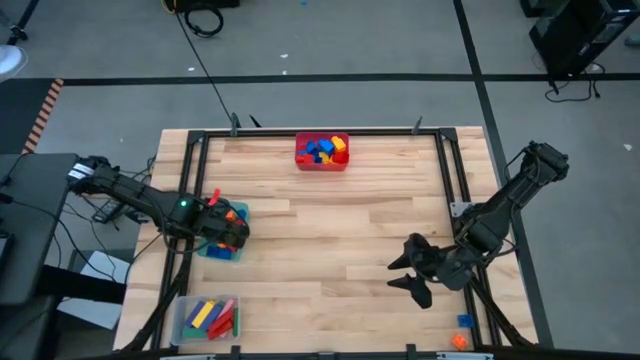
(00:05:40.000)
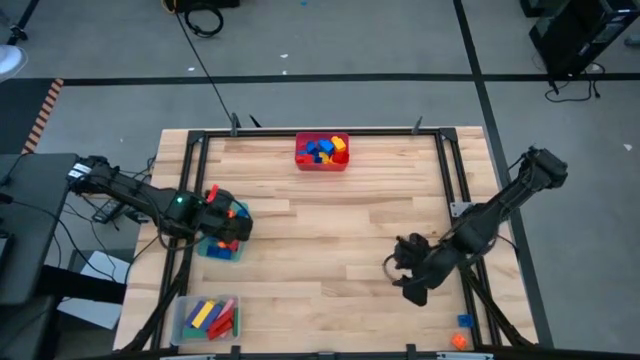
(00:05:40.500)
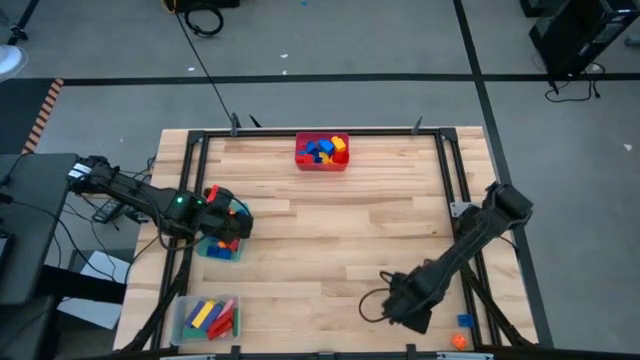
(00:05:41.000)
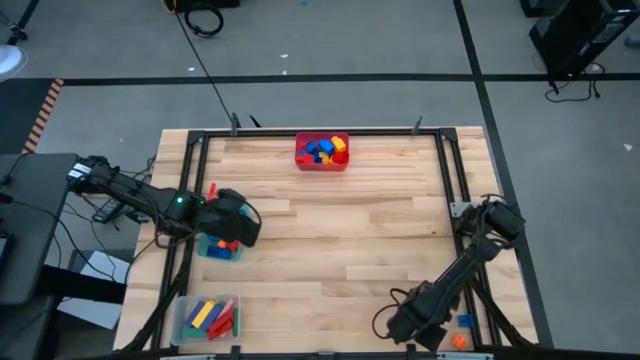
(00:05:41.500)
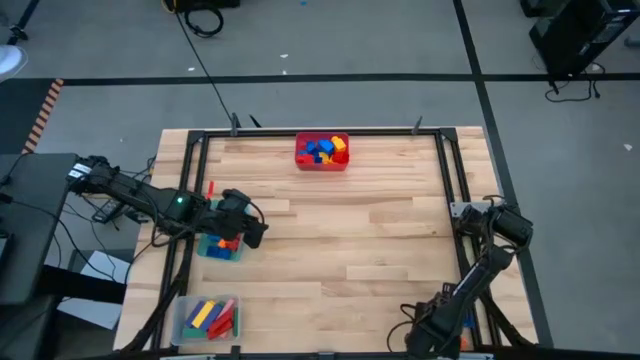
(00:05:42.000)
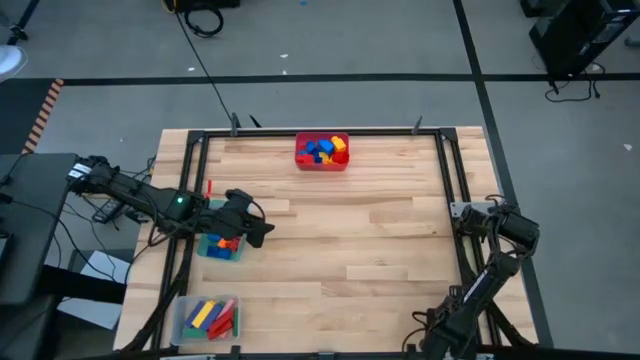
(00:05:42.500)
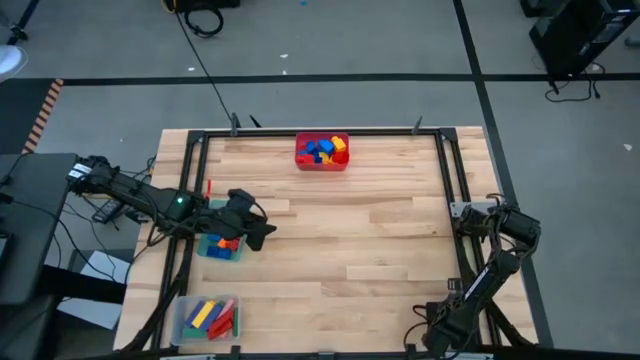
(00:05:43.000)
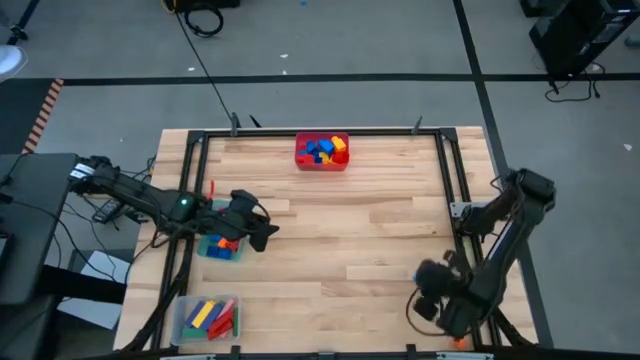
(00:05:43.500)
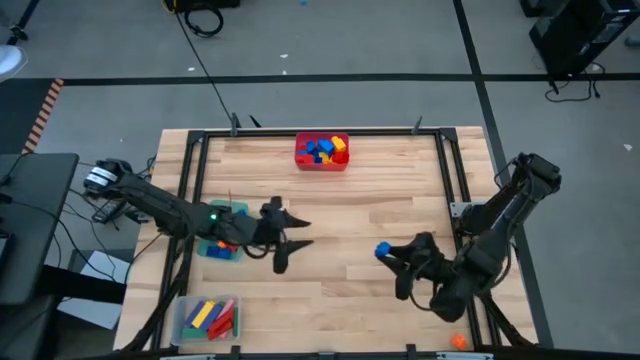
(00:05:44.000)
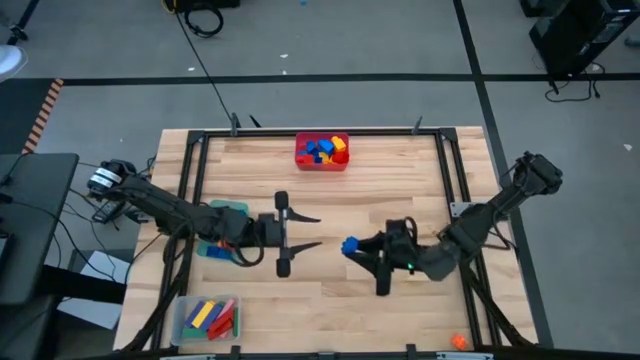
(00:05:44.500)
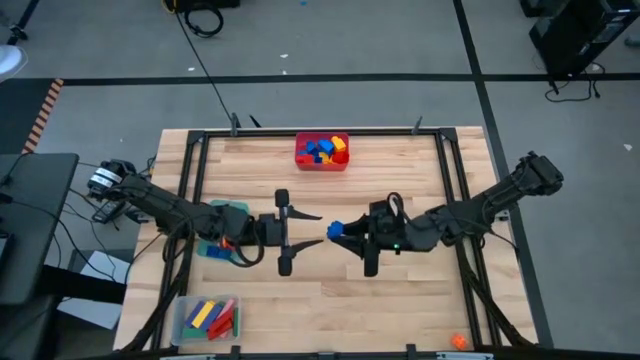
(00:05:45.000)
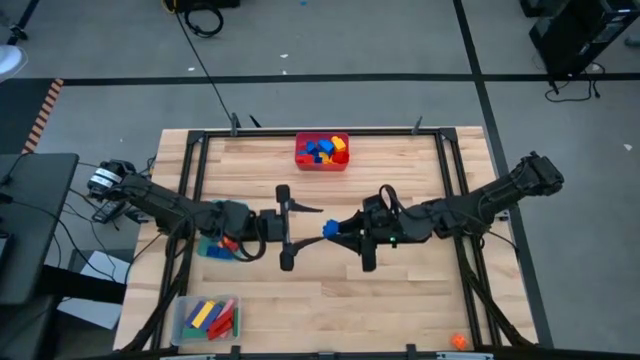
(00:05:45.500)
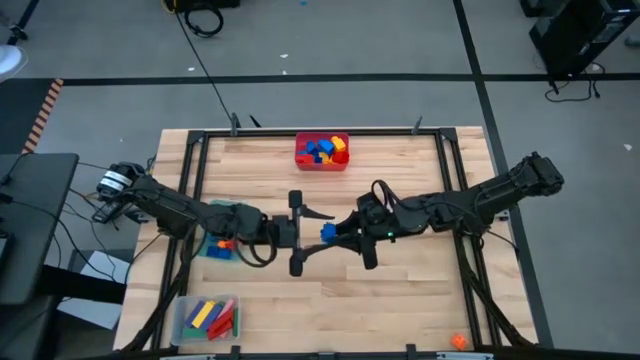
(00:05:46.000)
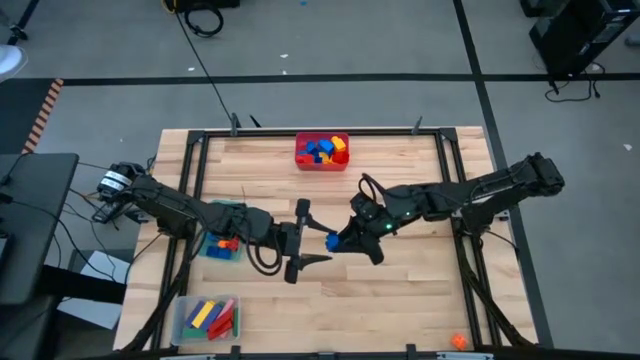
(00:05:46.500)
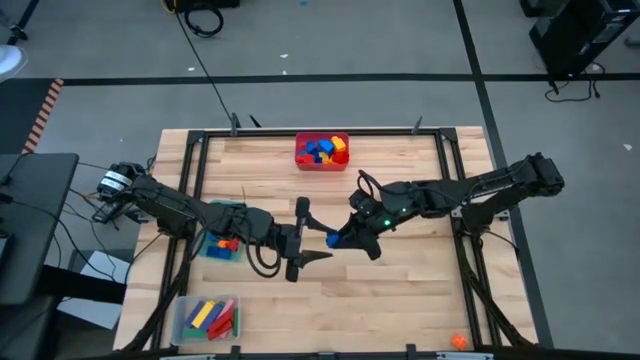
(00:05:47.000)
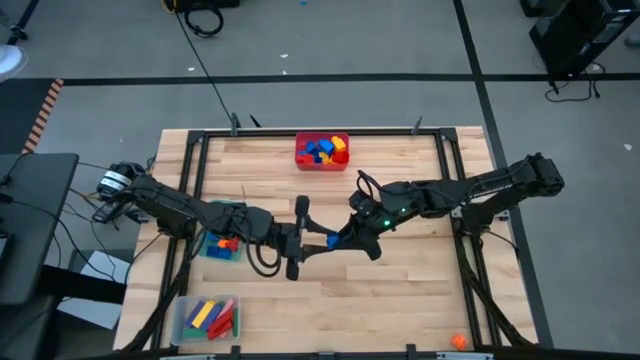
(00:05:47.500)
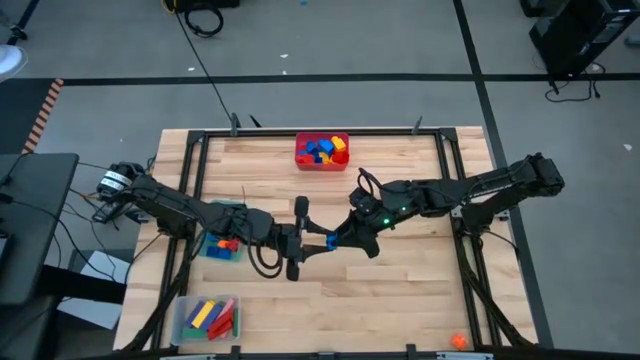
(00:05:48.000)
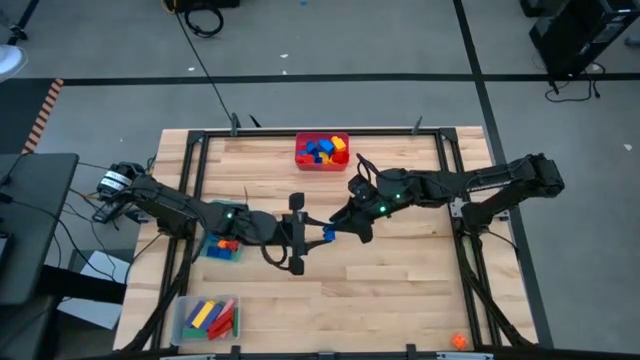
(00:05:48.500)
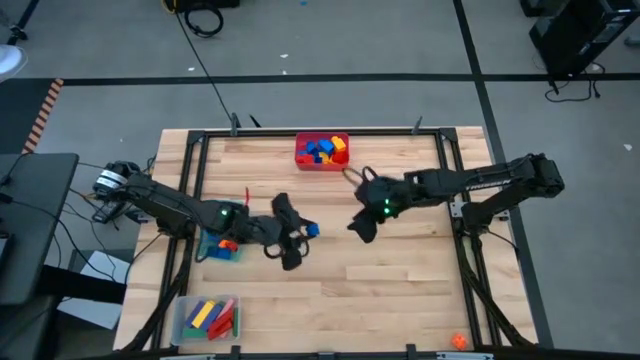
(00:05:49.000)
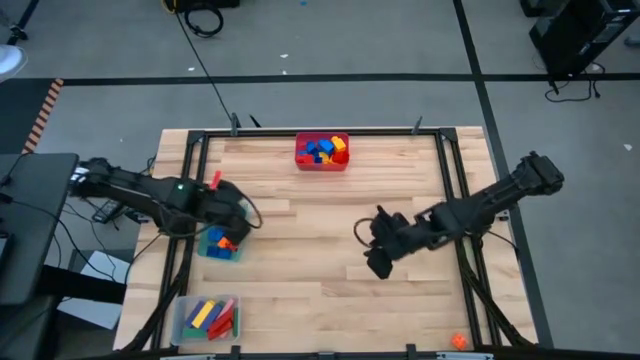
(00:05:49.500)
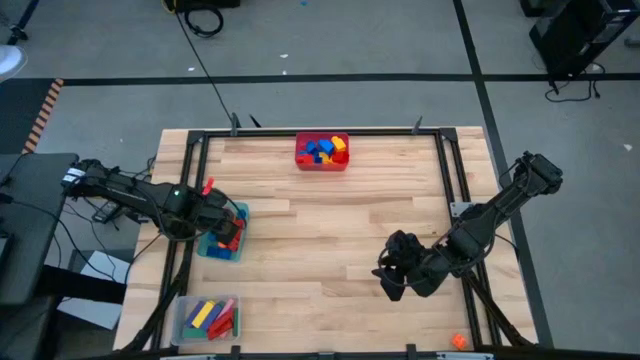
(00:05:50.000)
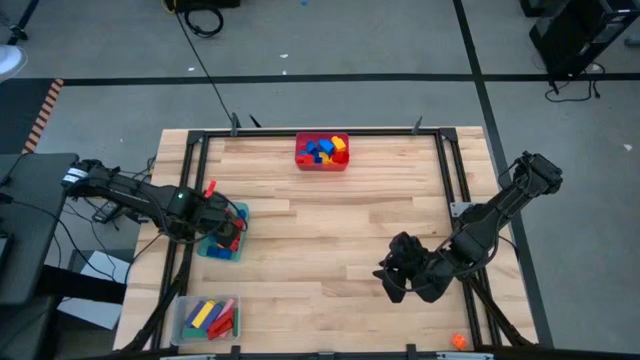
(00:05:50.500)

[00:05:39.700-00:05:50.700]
Task: Sort blocks by size
Put the blue 4 studded building block into the teal bin

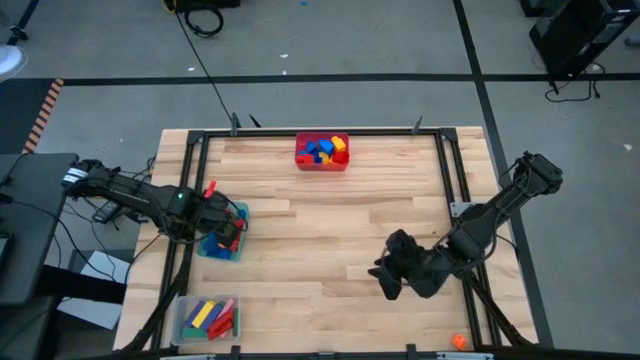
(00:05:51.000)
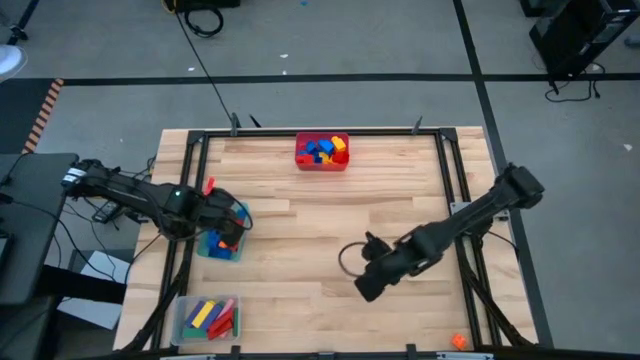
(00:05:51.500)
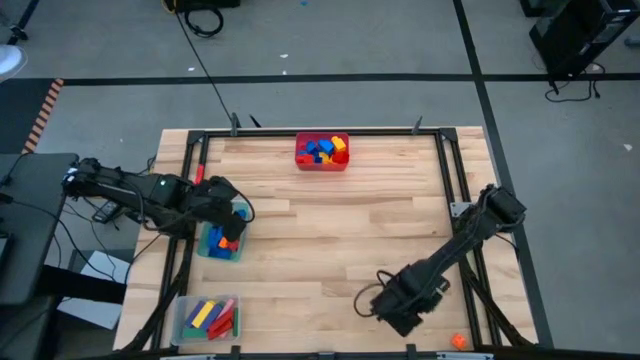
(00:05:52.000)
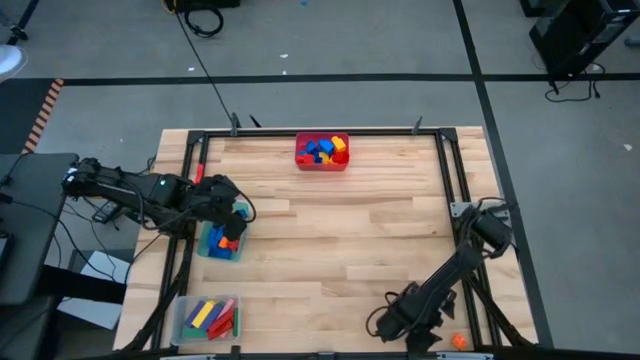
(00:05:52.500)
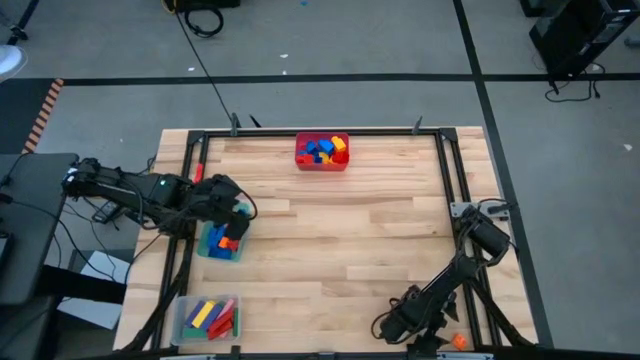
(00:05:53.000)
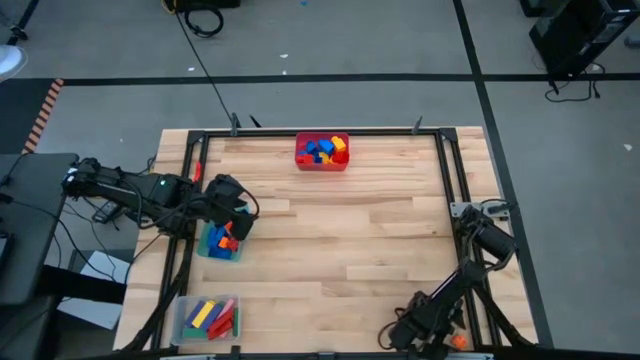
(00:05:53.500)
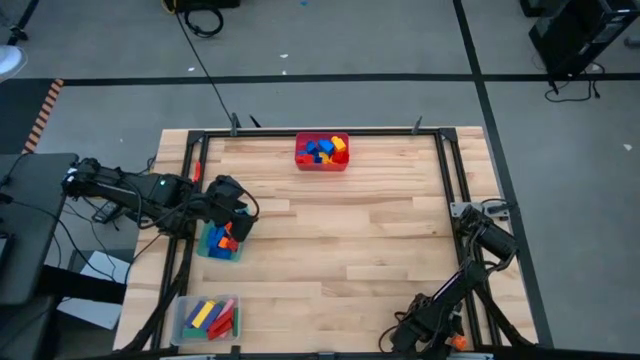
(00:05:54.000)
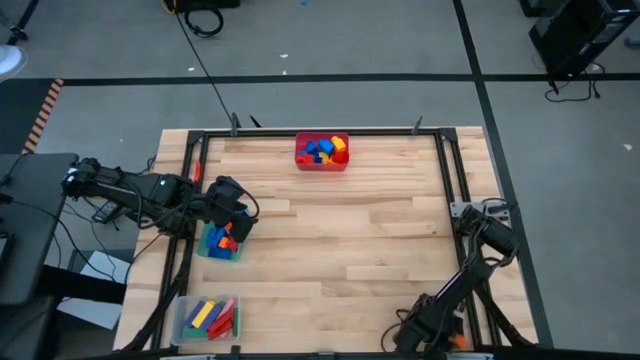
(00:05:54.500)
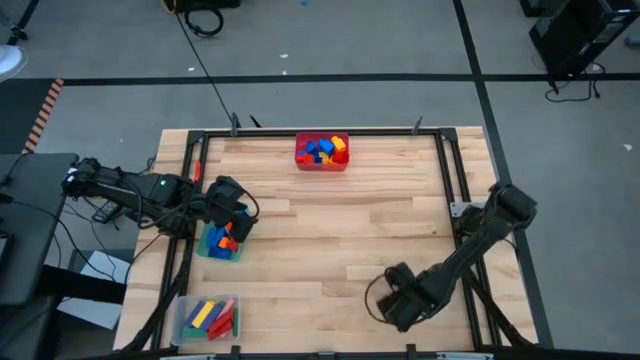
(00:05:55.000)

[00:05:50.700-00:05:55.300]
Put the orange 4 studded building block into the teal bin

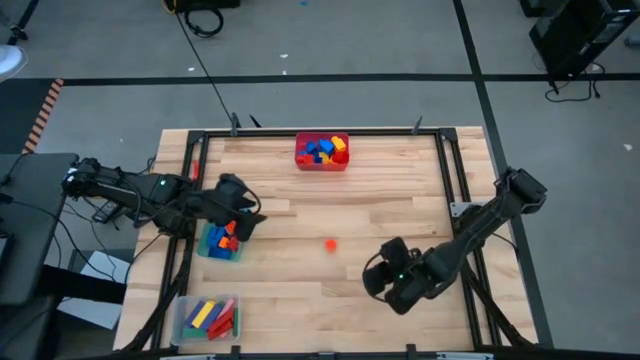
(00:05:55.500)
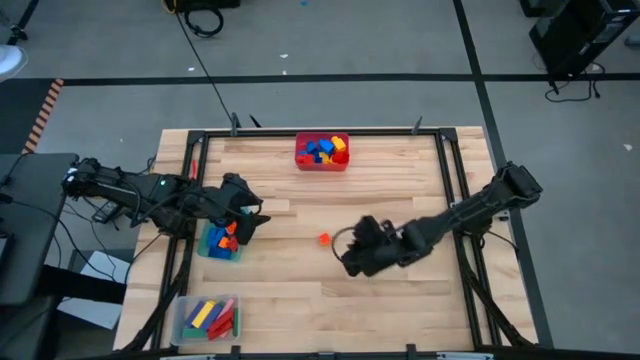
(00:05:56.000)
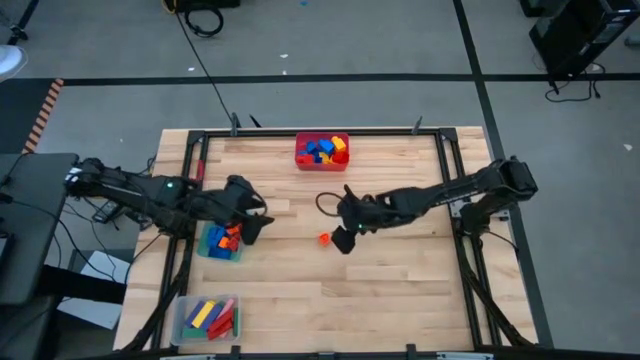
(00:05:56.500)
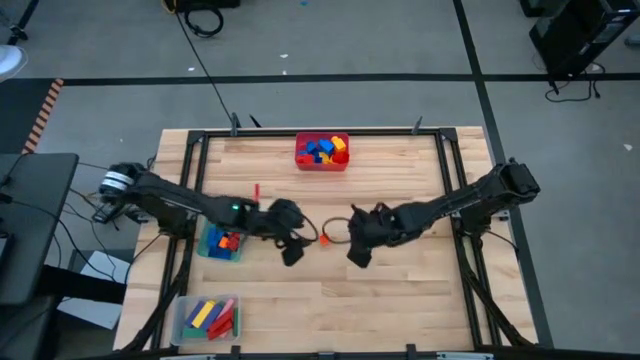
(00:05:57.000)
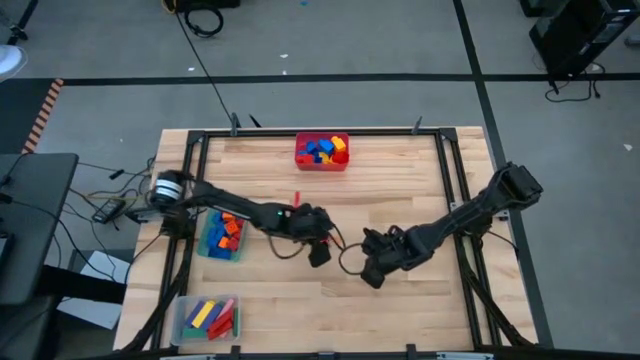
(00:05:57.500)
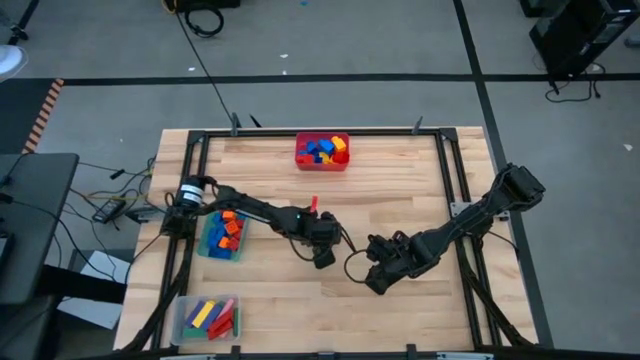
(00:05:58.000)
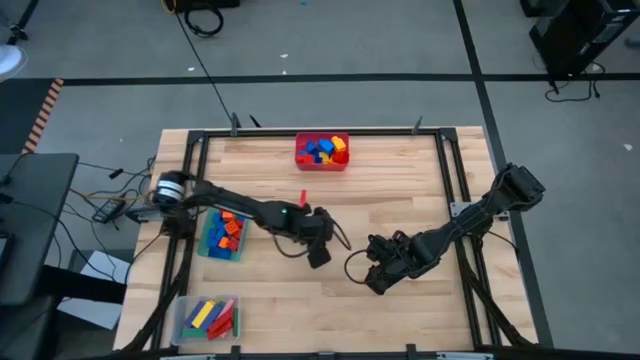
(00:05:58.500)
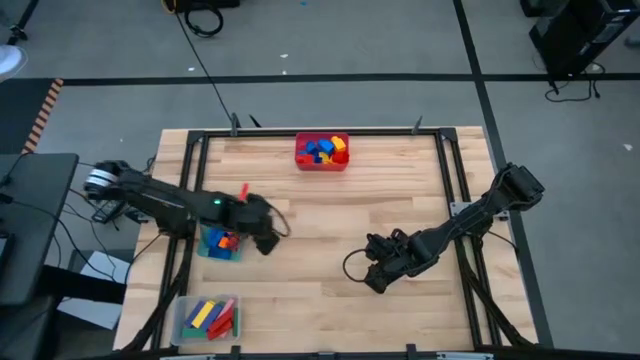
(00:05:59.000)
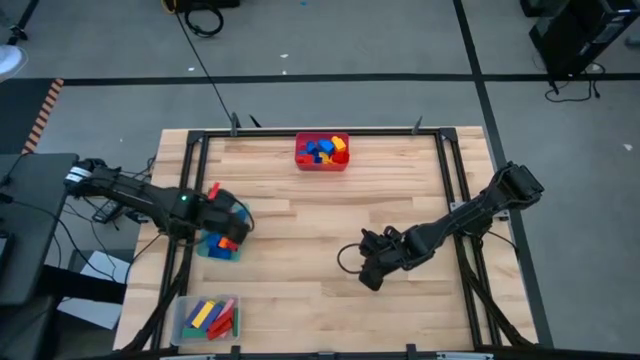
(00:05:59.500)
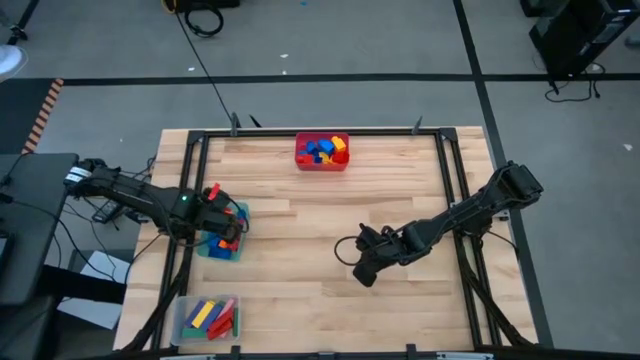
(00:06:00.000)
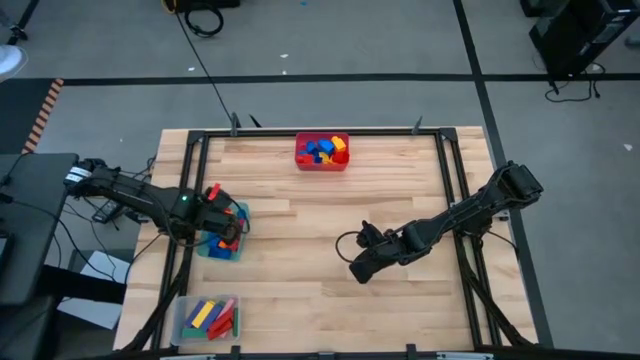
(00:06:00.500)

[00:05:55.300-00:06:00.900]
Put the orange 4 studded building block into the teal bin
